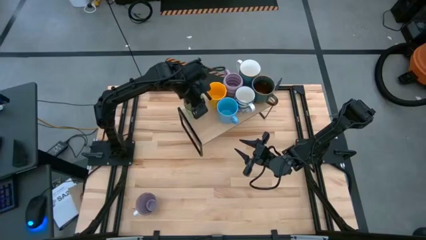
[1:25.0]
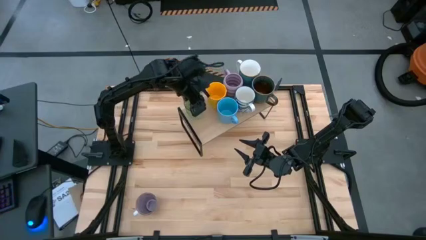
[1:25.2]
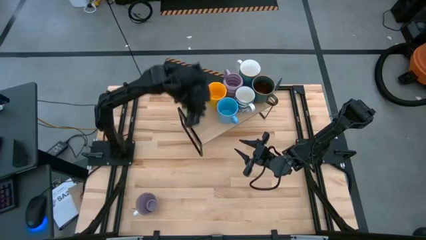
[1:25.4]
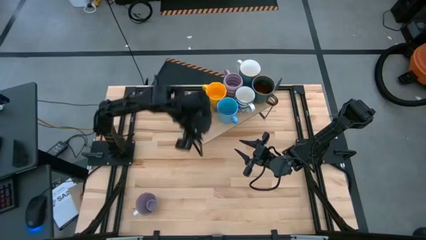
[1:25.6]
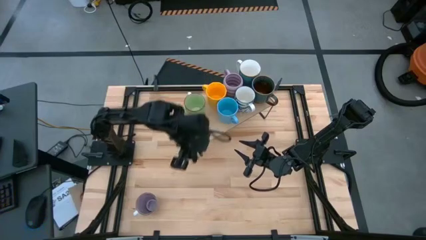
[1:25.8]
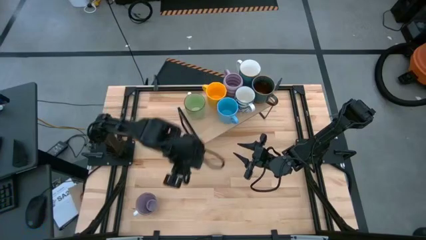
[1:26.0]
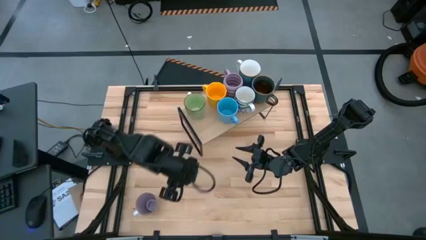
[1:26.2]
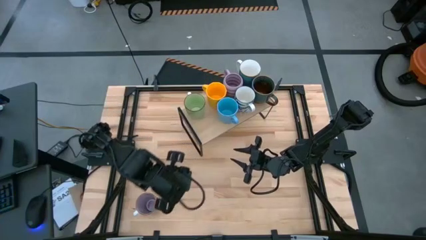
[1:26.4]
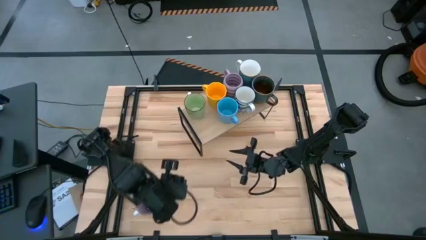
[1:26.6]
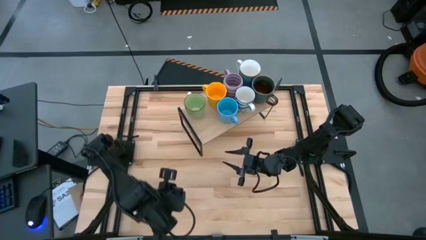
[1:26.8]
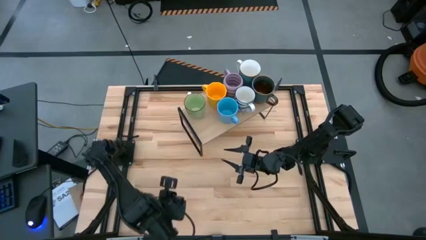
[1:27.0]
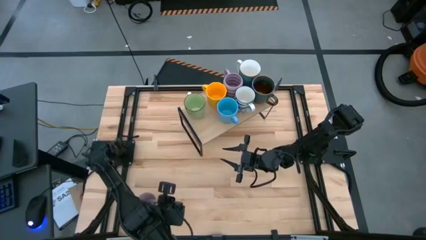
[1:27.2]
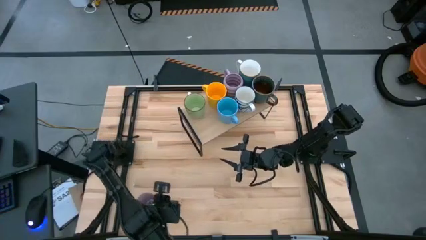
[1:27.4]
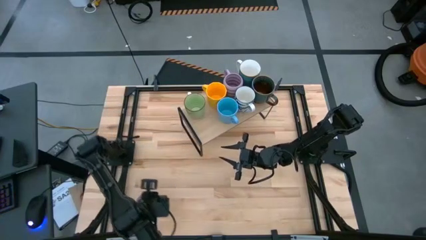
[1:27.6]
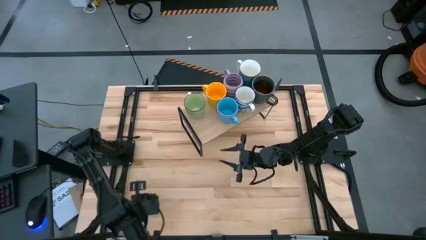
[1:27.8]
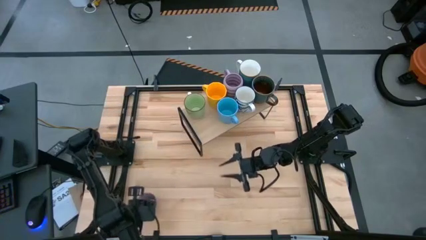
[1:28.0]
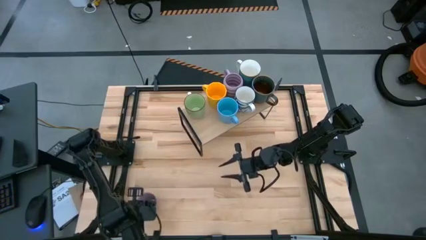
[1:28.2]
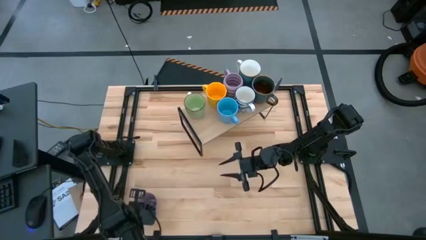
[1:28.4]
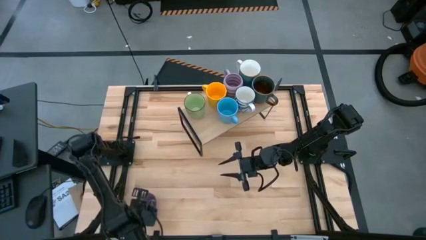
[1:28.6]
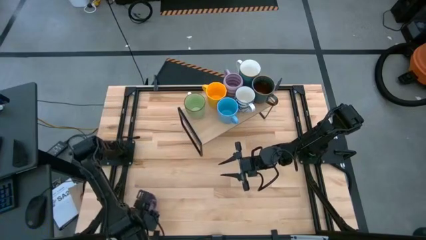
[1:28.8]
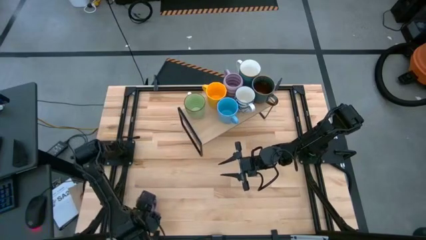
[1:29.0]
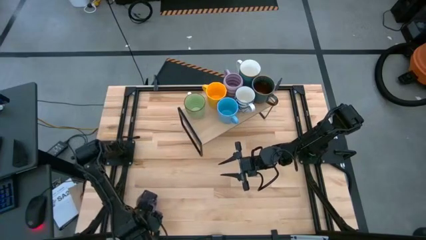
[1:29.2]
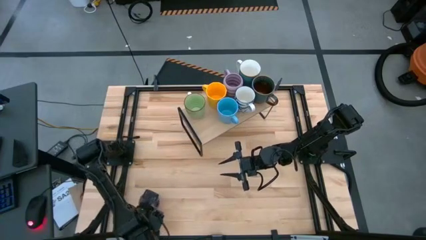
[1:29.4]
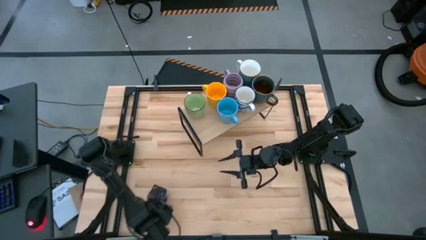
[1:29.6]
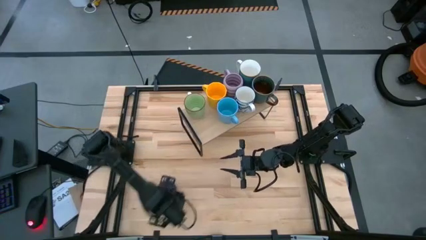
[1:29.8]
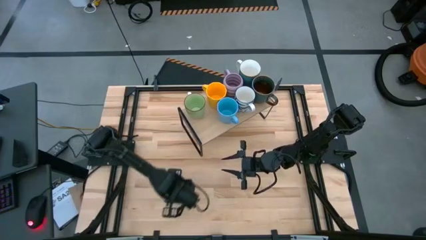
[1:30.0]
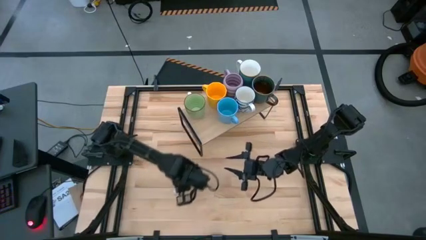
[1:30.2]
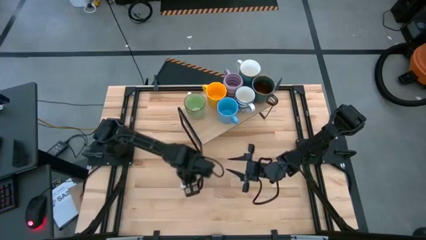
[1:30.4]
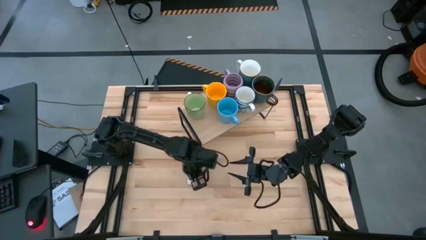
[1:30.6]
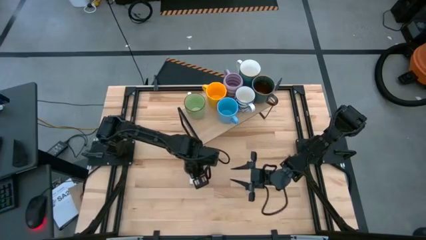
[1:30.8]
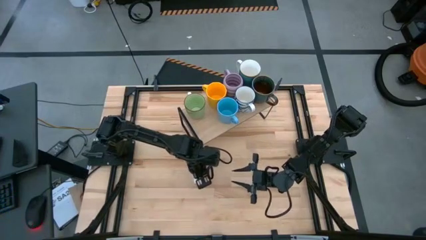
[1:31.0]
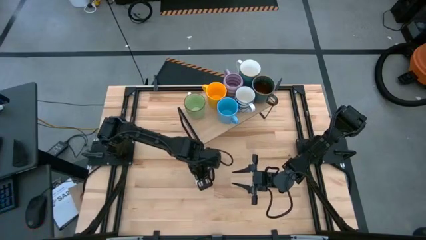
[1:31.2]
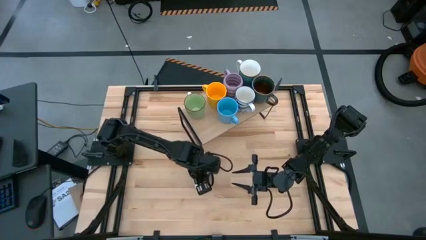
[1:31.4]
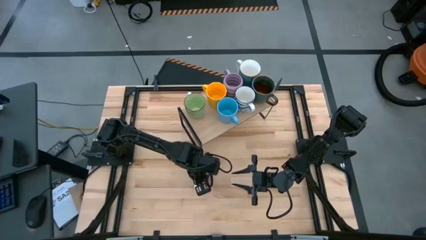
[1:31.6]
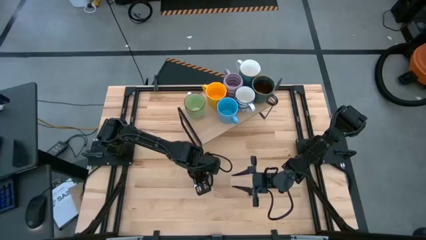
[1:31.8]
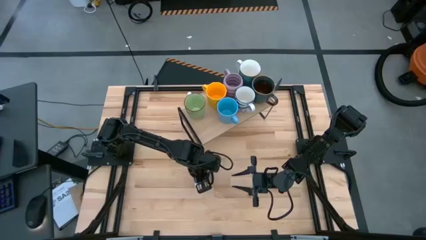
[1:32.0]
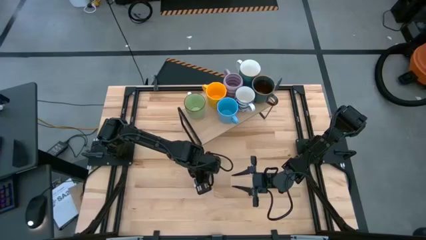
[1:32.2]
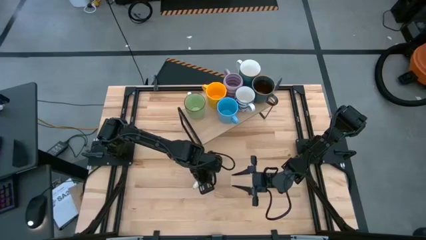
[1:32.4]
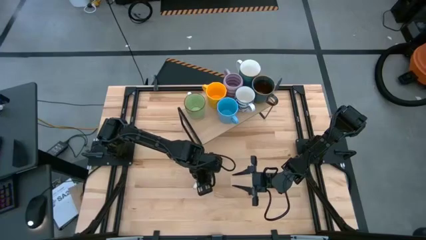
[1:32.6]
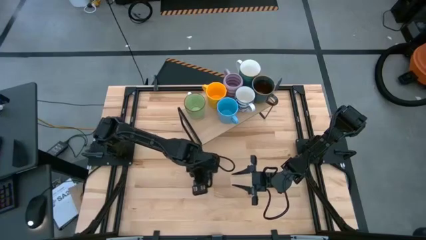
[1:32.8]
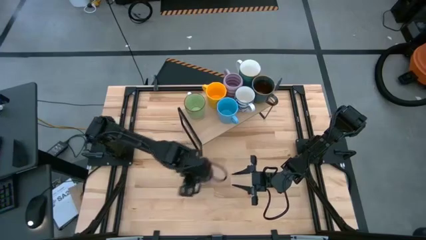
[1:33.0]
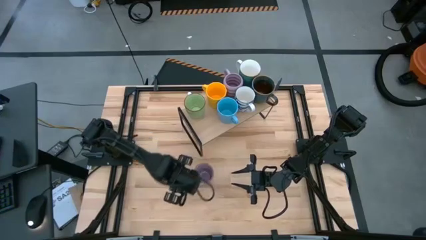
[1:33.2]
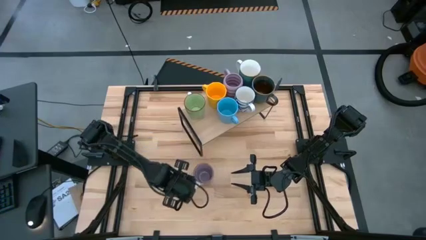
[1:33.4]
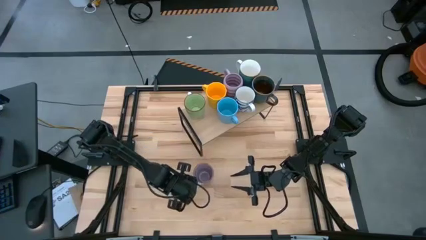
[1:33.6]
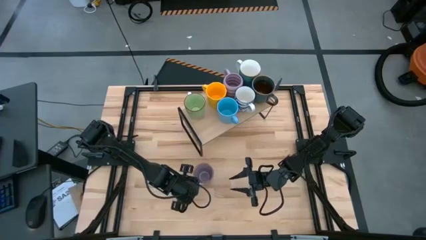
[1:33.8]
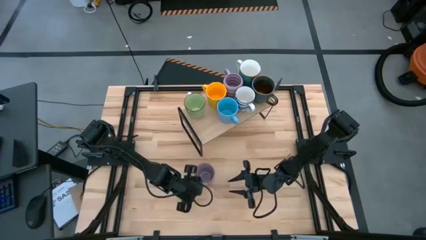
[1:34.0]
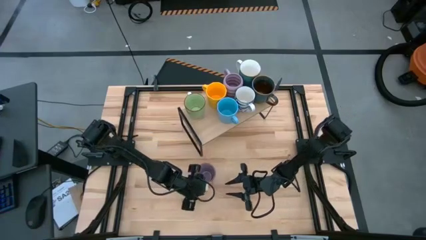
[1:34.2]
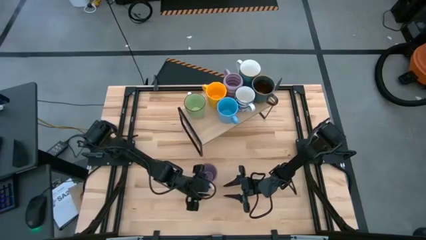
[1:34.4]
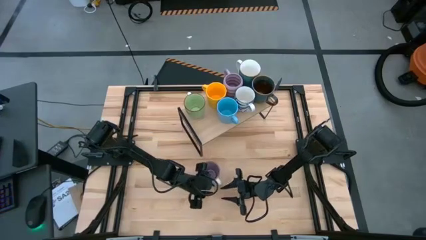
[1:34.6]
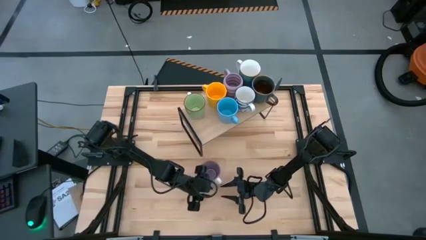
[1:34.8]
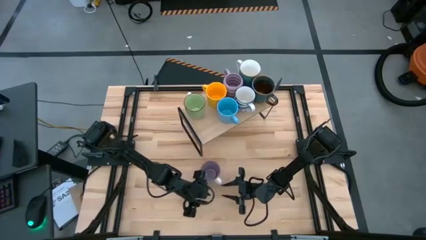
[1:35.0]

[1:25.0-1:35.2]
Task: Place coffee mugs
Put the purple mug on the shelf

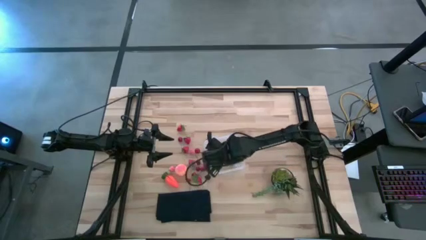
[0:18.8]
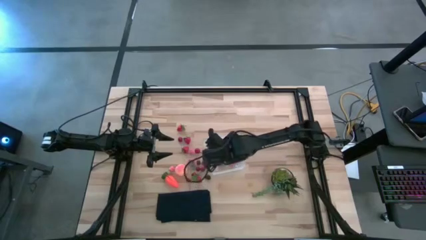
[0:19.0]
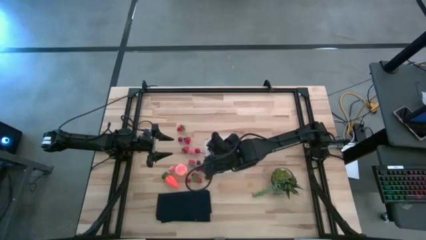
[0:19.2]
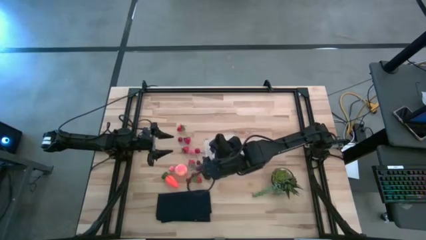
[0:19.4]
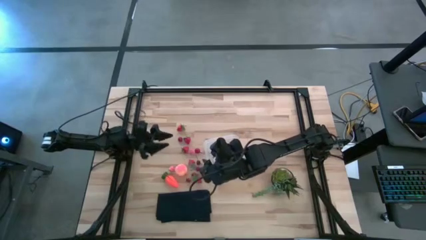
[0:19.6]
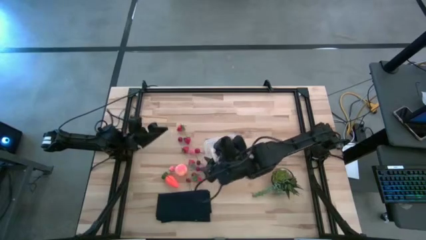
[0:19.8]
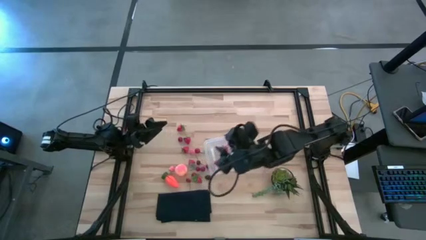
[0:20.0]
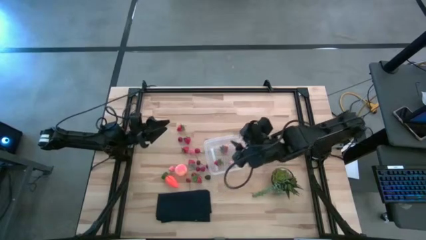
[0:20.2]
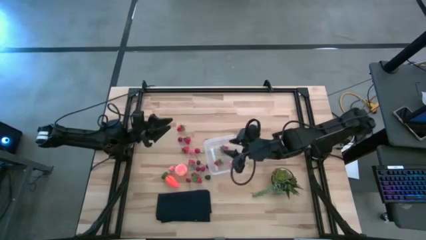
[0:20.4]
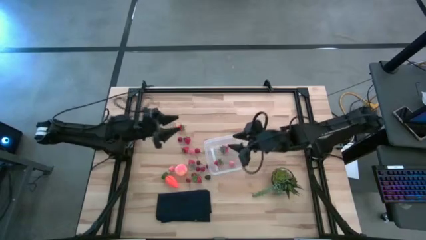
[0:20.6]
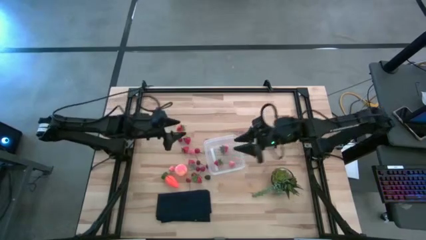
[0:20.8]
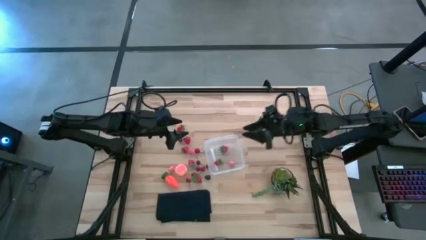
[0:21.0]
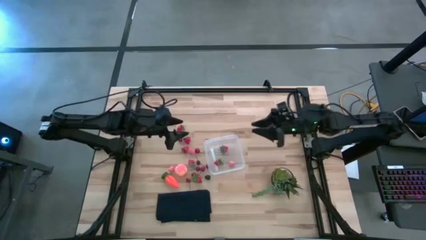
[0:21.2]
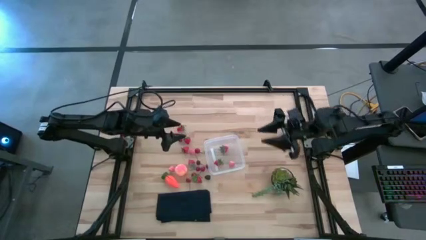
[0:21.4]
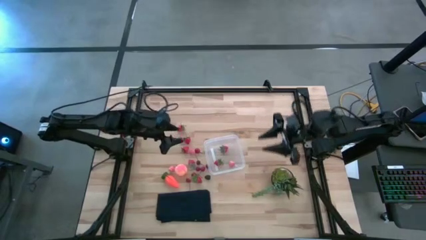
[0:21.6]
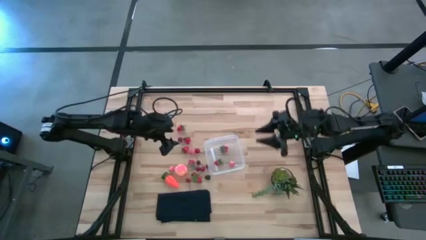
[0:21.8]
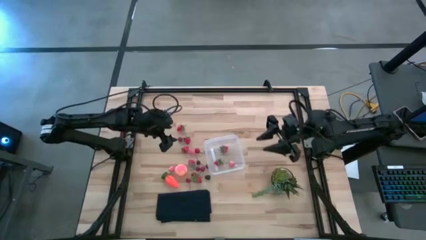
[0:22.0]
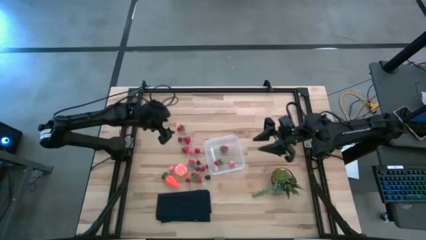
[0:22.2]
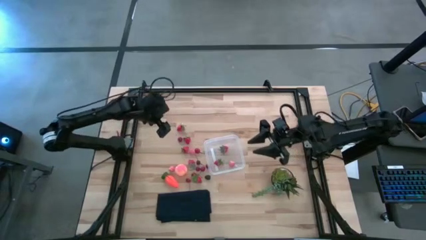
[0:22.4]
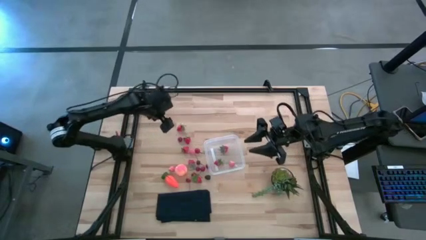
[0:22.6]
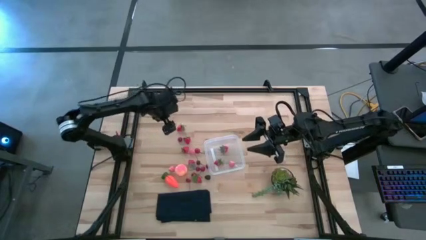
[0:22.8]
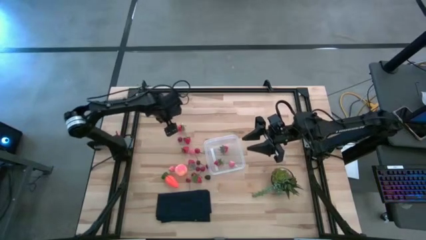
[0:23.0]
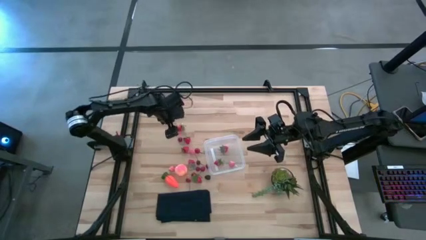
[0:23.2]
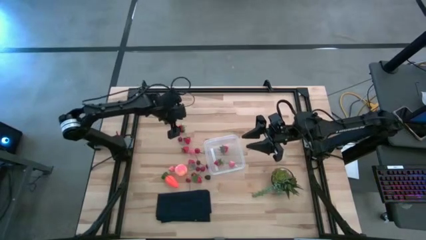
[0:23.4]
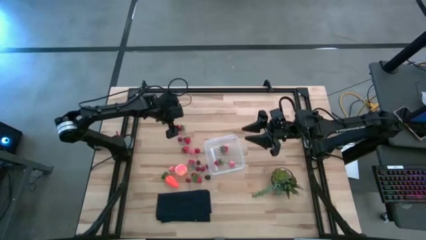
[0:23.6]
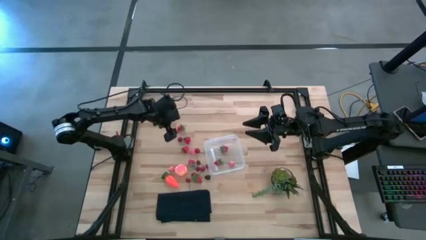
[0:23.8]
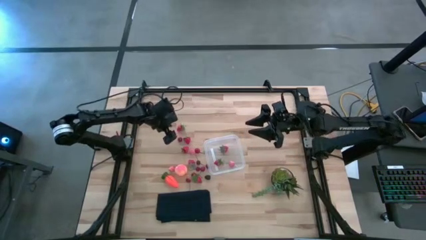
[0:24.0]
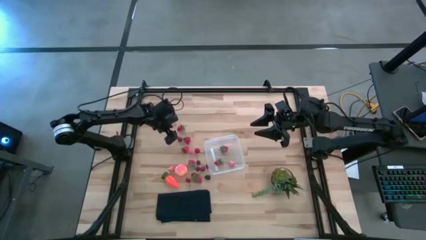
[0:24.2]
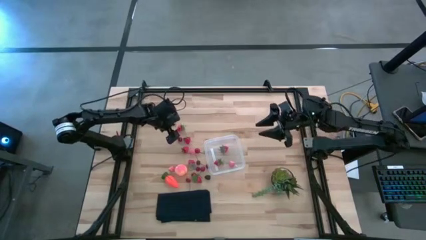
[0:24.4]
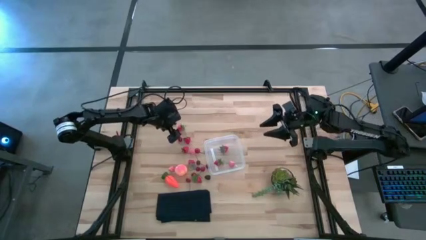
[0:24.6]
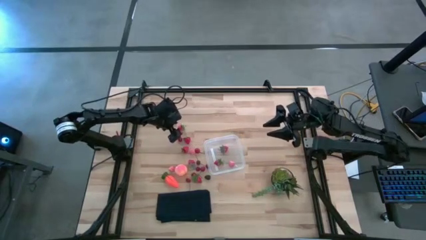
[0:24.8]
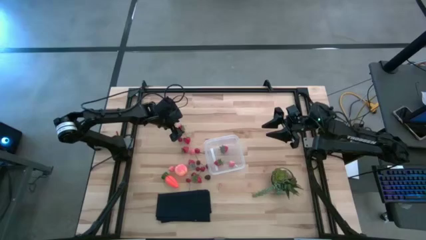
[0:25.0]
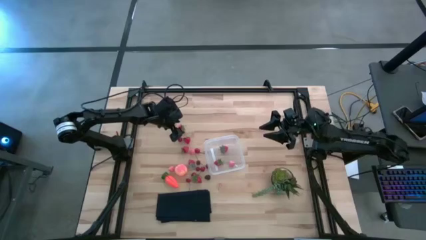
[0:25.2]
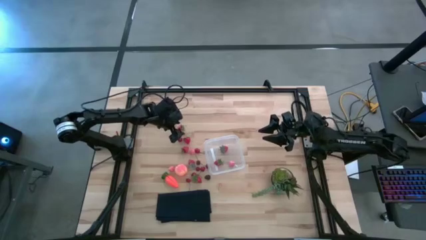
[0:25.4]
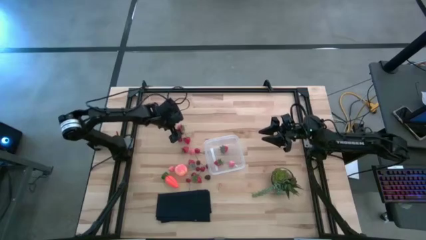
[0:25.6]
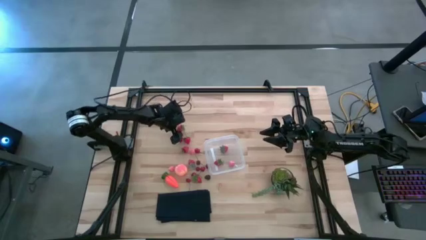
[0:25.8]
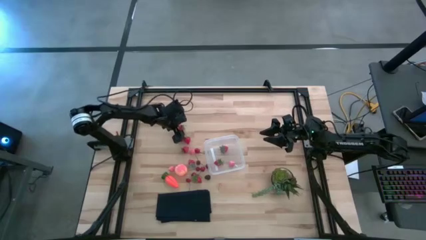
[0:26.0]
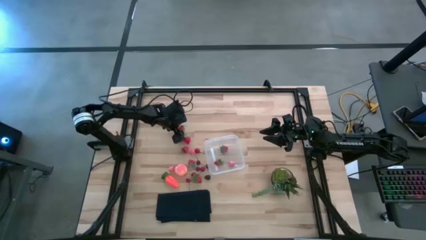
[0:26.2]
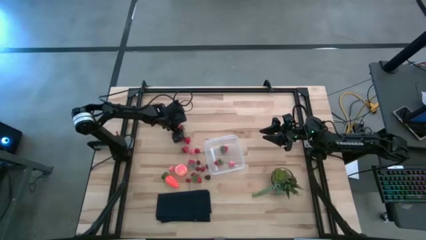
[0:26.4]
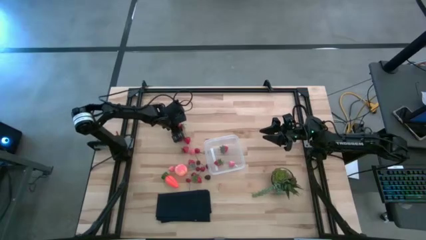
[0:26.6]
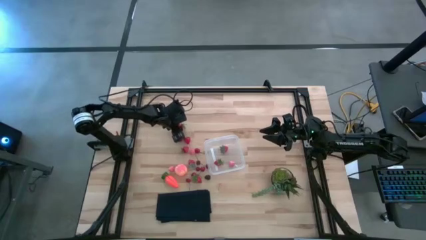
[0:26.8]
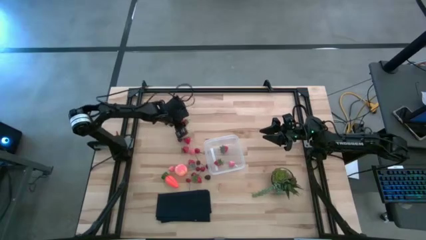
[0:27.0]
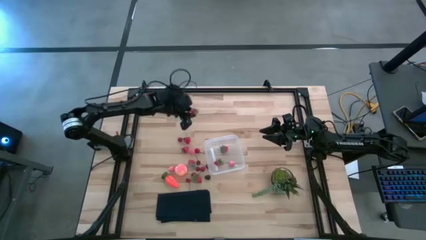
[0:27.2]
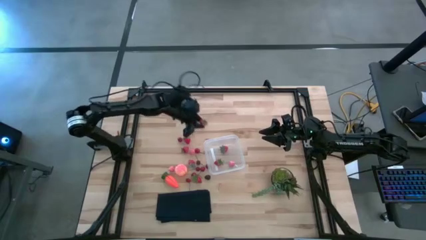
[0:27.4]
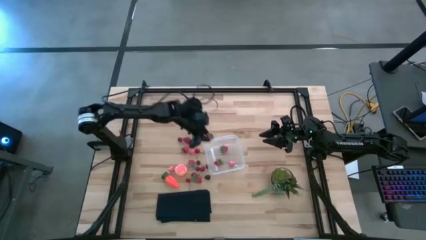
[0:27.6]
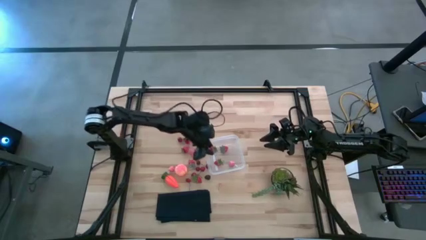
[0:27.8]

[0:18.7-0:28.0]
Task: Pick and placing Produce into tupperware
Put the red strawberry into the container
